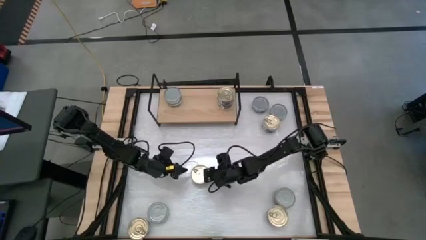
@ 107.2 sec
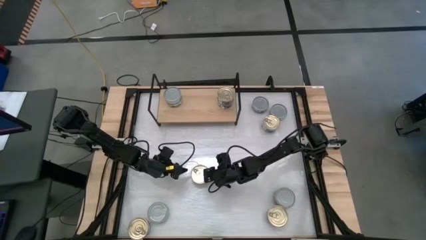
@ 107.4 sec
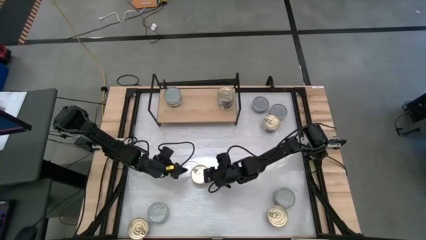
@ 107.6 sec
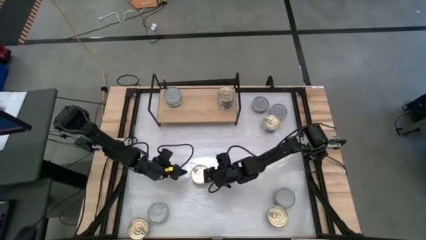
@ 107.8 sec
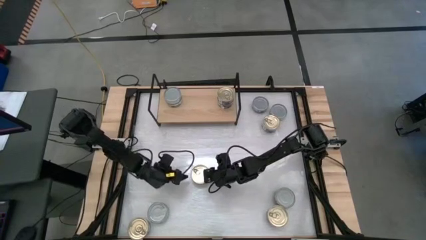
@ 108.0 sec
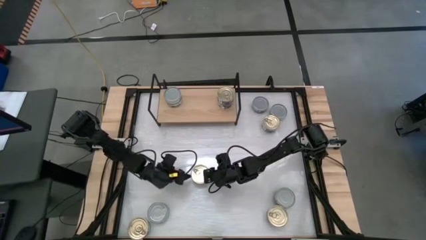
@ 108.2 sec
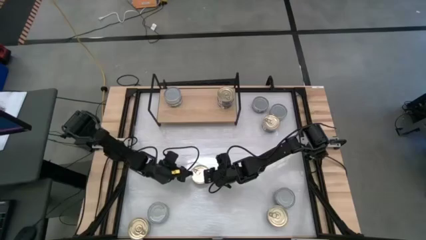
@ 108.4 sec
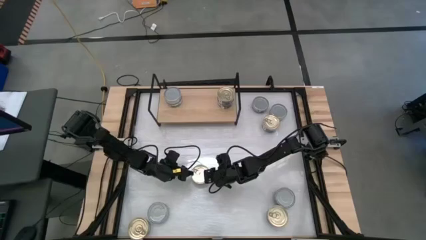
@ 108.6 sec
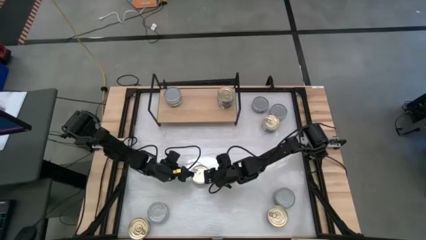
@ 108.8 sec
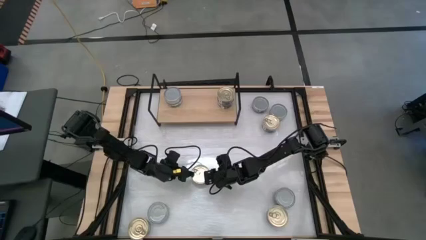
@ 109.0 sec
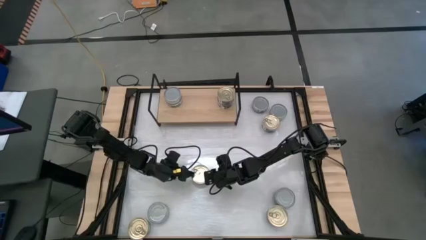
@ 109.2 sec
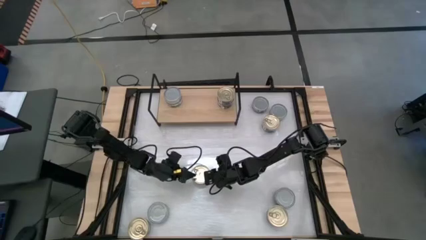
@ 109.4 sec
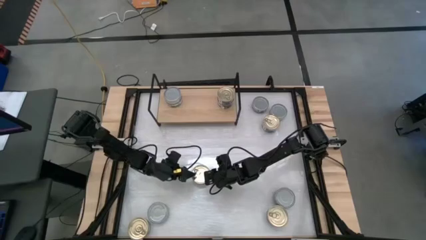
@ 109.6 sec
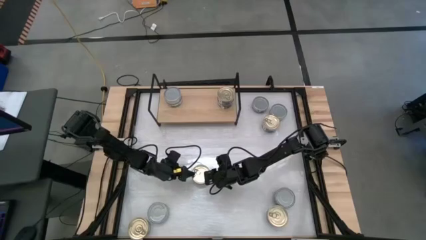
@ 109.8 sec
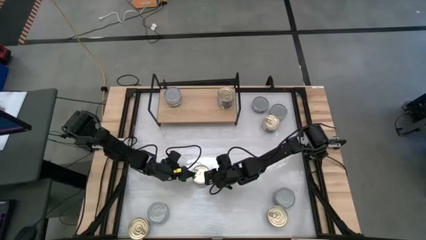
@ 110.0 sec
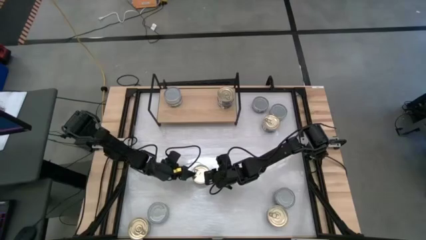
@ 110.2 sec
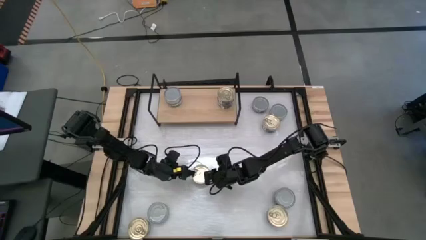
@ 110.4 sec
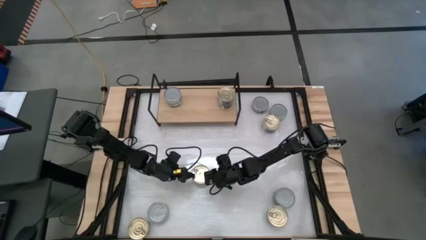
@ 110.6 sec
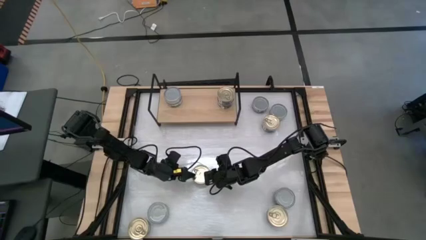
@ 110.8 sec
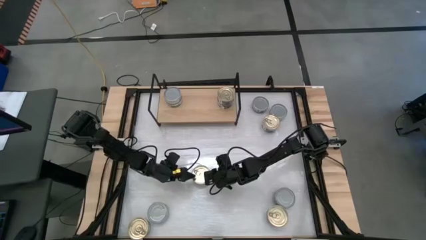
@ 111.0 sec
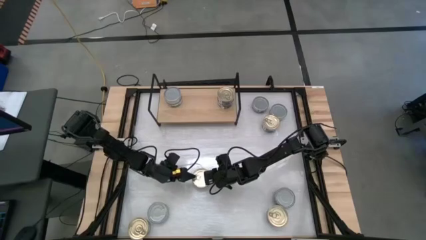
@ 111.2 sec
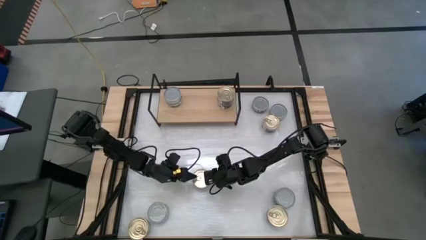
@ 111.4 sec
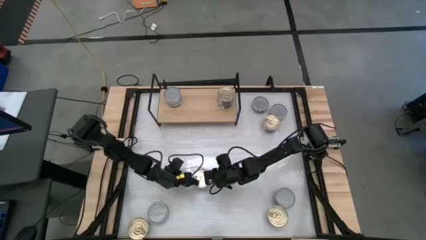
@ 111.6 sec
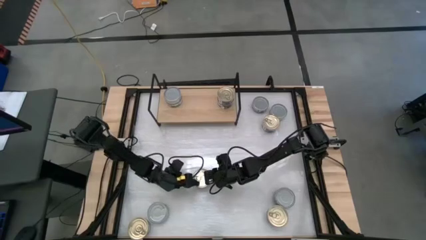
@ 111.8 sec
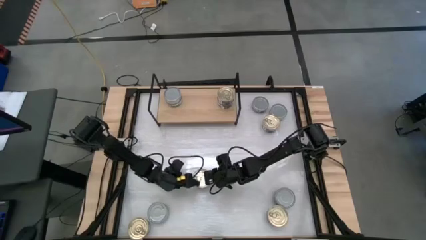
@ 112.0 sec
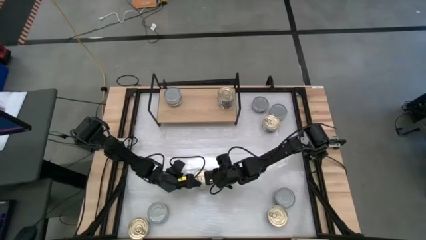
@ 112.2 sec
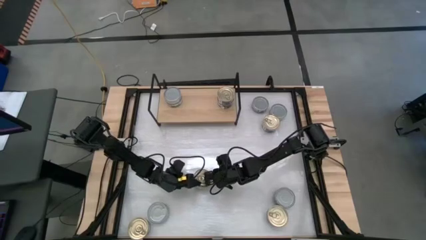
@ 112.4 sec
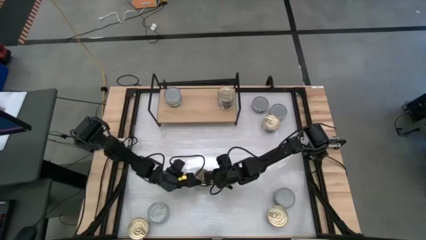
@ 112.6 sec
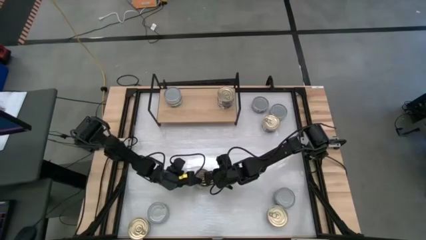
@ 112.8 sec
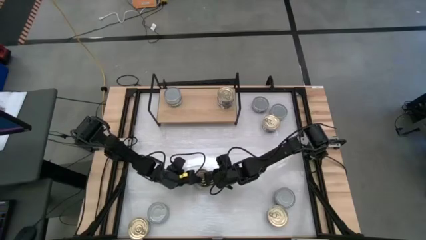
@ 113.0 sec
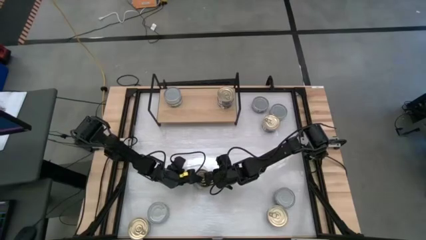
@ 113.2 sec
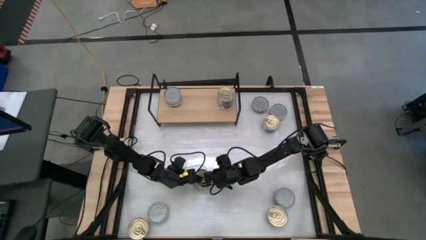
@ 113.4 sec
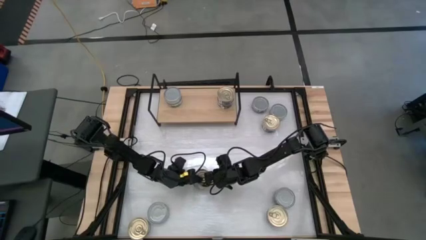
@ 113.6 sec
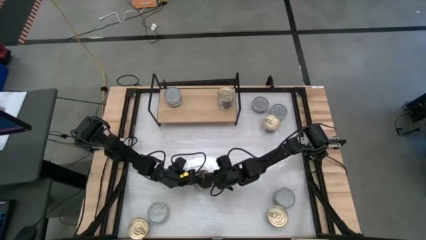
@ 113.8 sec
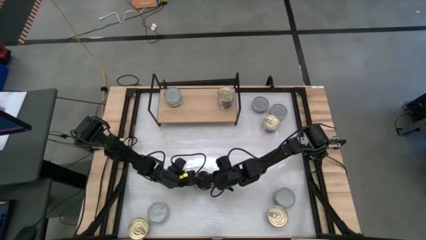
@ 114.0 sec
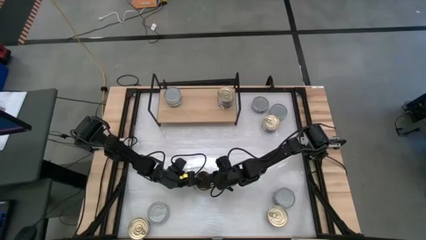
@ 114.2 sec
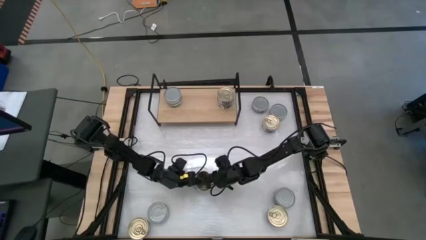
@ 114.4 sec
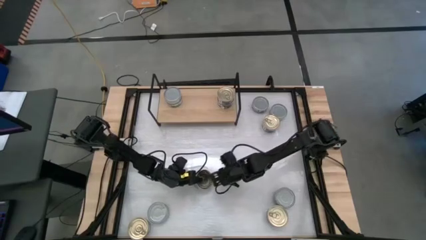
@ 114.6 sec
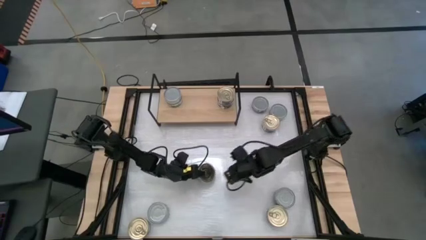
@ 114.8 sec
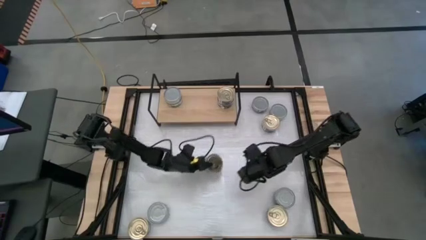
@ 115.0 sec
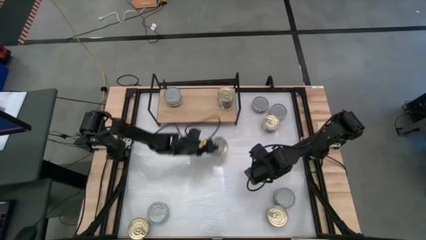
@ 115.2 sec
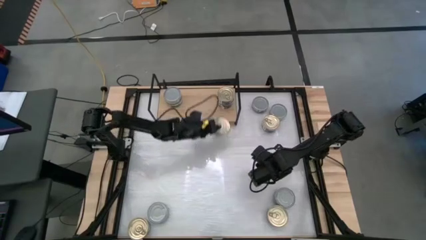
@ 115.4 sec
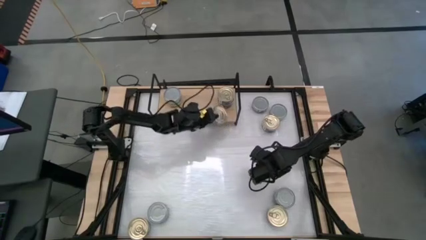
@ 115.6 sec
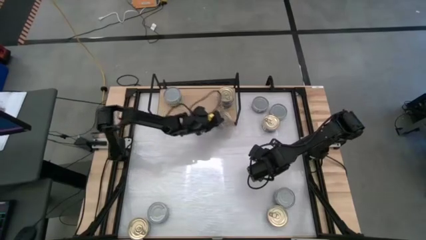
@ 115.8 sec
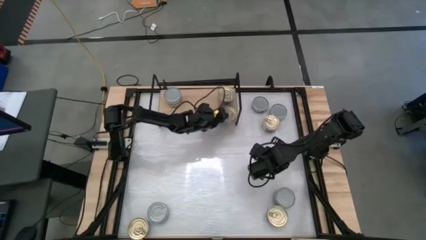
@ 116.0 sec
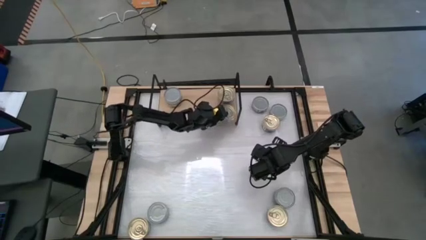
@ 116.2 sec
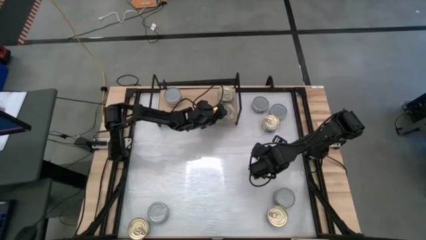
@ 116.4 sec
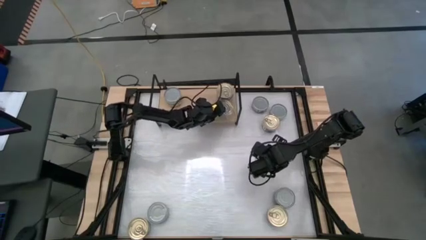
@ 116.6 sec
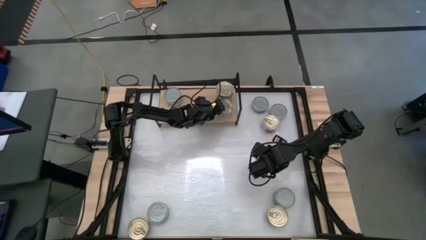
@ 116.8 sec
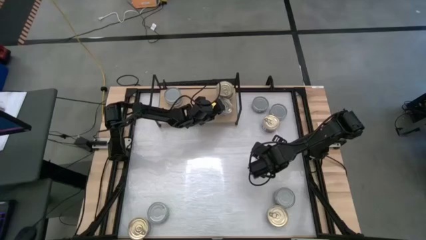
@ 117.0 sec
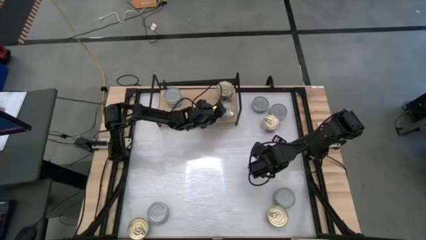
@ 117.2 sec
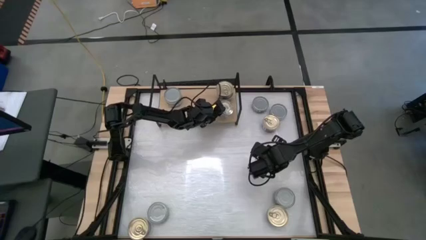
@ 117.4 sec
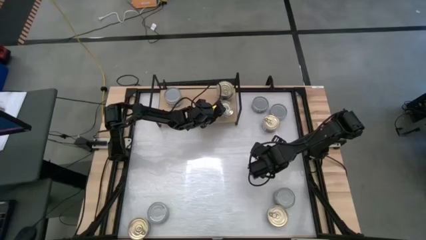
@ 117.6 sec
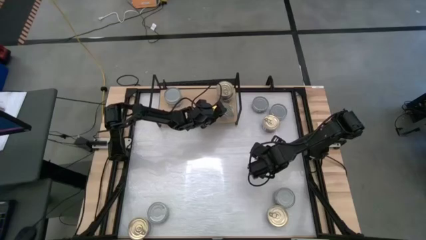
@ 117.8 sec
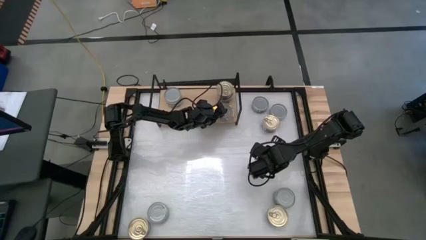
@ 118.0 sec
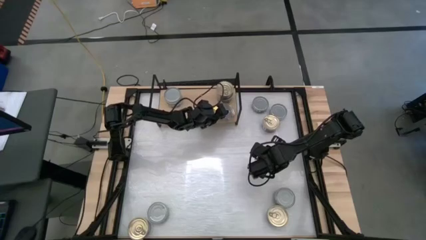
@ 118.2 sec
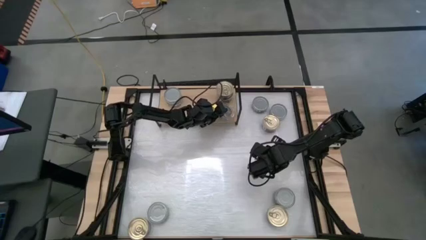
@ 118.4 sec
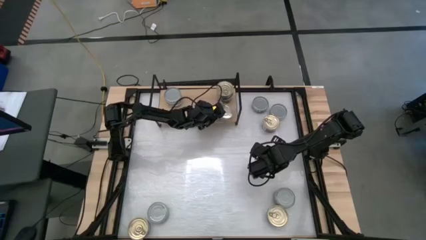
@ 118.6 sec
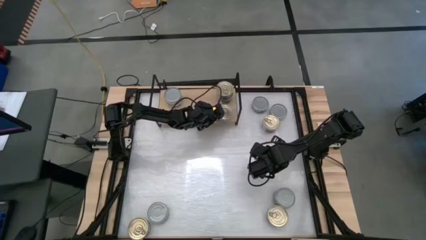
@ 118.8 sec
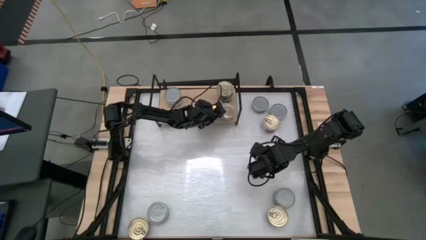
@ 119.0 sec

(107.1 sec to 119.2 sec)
Task: Stack canned seafood by type on shelf
Put the blue tuna can on the shelf

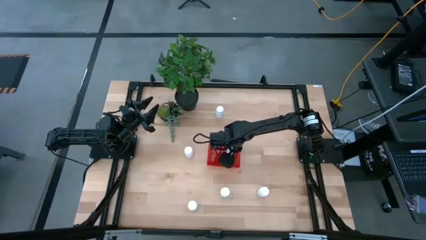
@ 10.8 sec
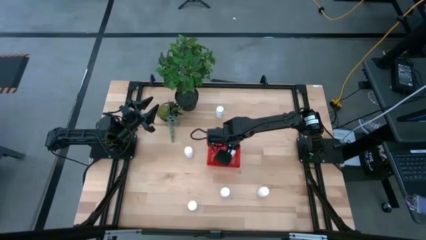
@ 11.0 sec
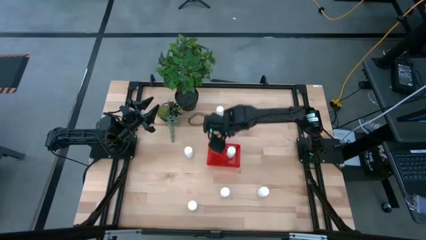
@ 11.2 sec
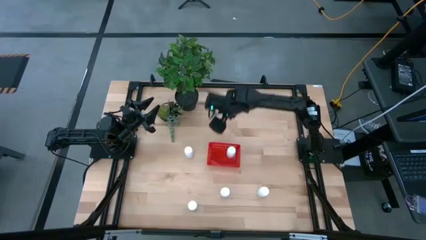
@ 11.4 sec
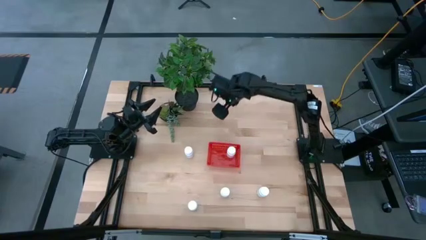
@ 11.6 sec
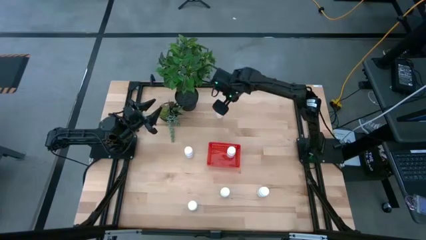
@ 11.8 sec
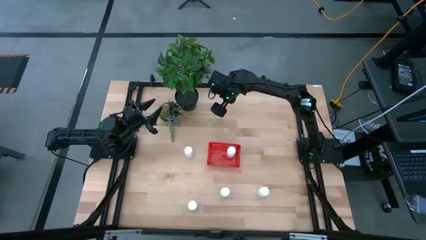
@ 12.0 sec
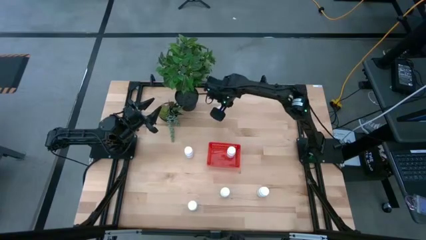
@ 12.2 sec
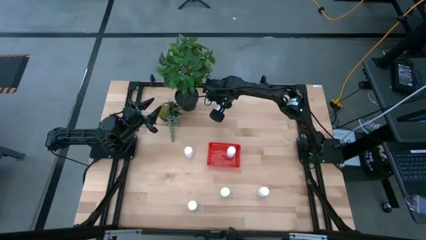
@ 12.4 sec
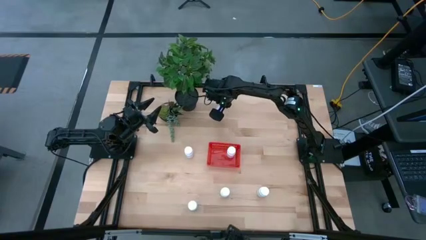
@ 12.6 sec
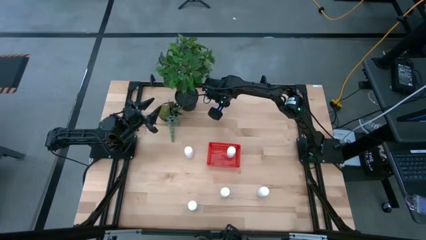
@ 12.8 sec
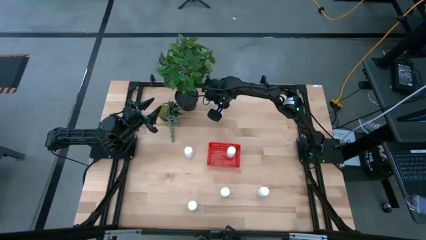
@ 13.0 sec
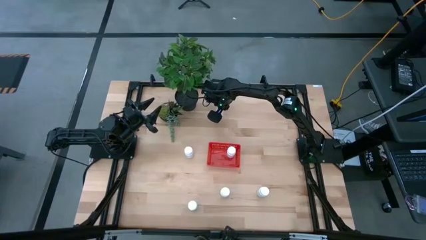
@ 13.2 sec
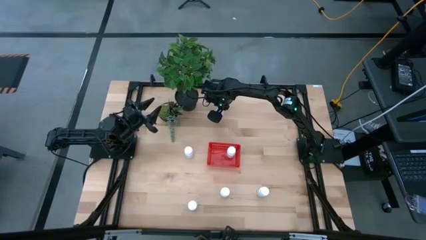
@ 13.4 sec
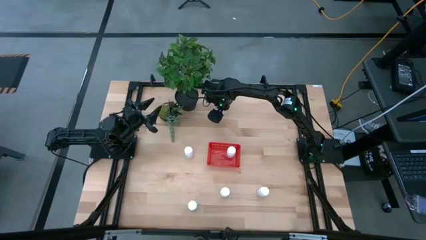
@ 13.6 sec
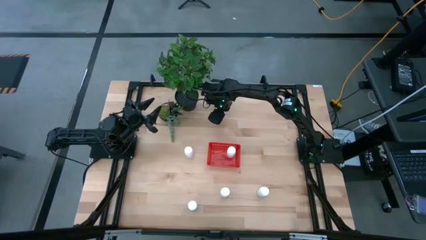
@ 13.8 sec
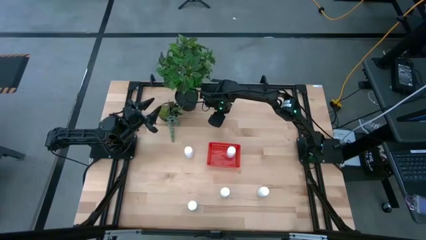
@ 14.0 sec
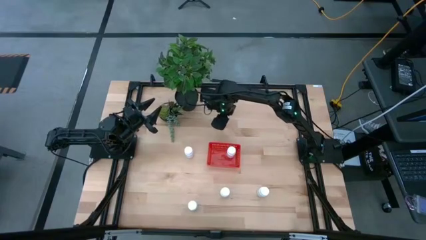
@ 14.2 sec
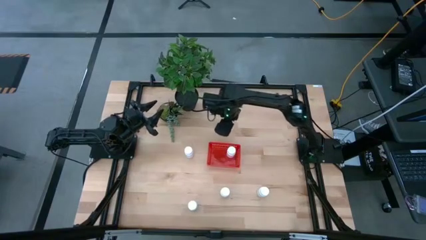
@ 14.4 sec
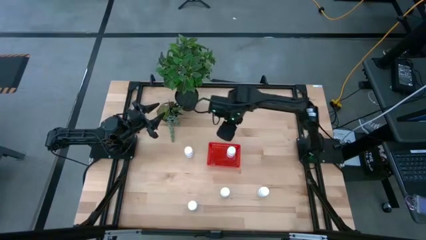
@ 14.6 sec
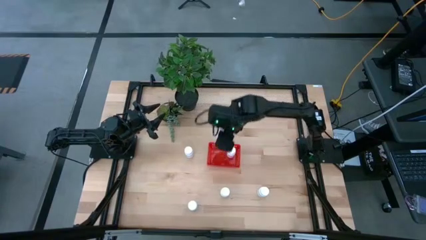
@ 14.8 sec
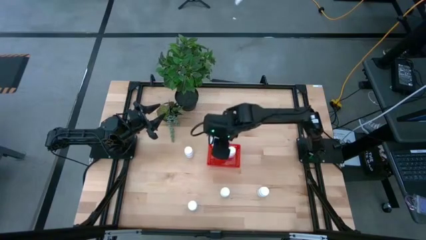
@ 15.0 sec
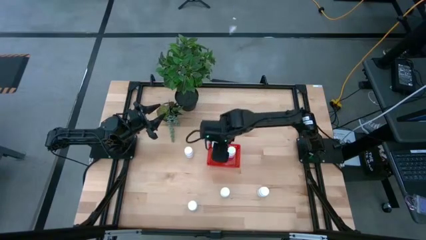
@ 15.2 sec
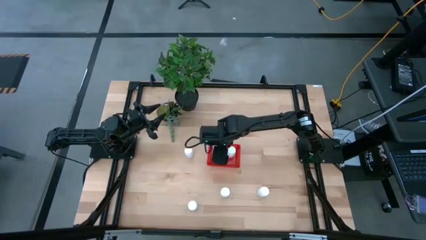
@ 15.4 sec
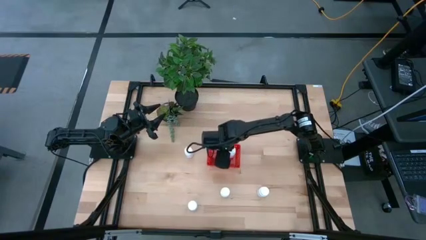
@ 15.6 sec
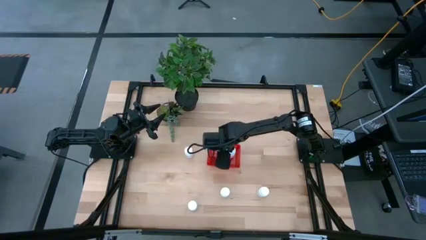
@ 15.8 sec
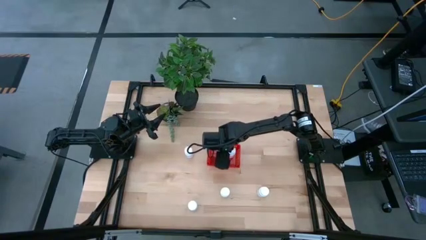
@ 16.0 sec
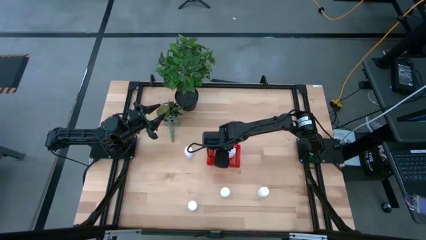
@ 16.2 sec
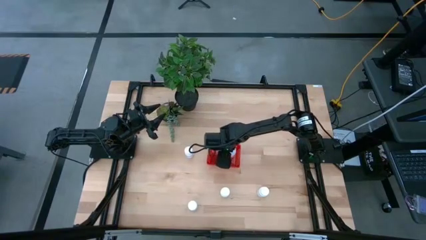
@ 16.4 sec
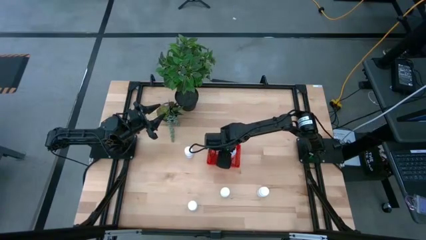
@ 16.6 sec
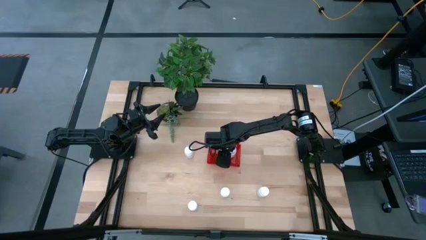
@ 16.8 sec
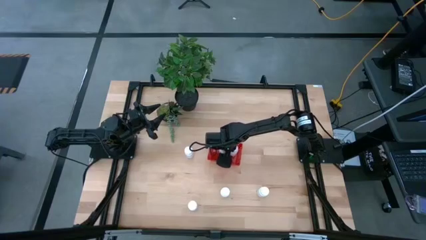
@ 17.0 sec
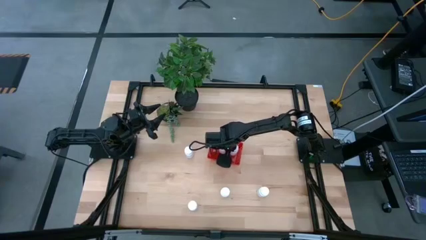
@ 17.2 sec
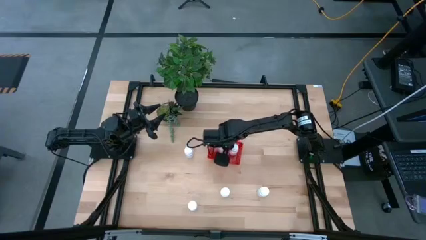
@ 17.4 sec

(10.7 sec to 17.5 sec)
Task: Pick and place pill bottles into a basket
Put the white pill bottle into the red bin
